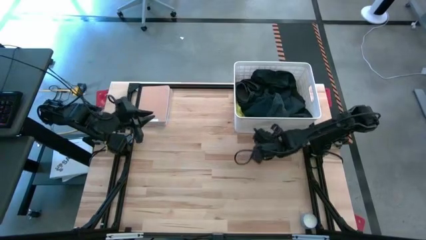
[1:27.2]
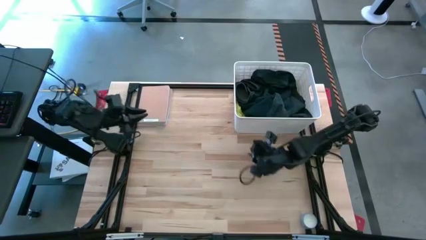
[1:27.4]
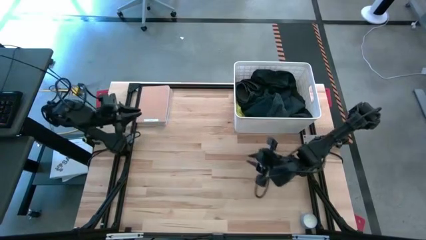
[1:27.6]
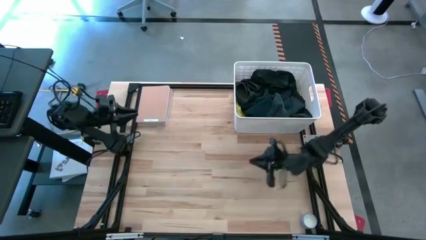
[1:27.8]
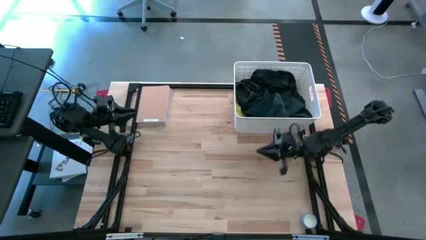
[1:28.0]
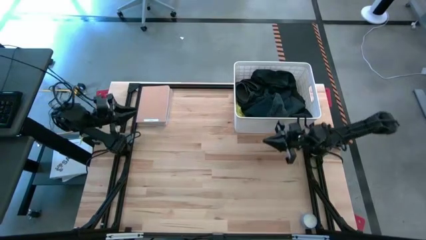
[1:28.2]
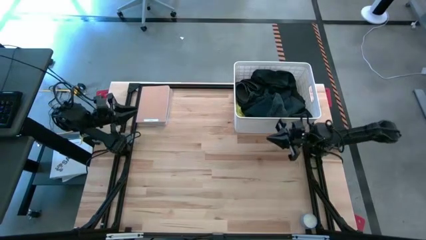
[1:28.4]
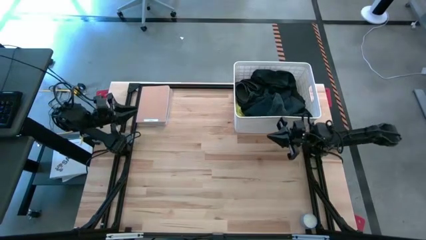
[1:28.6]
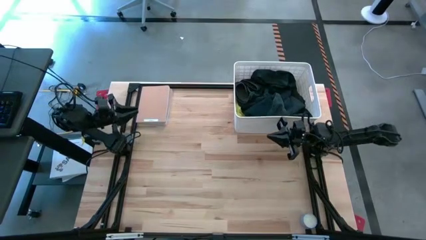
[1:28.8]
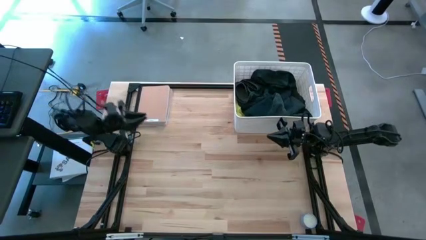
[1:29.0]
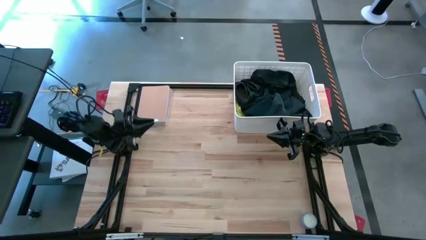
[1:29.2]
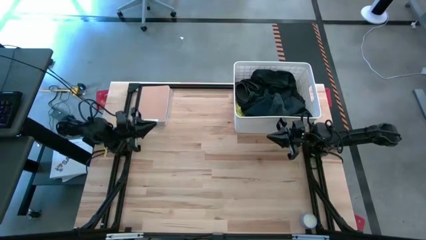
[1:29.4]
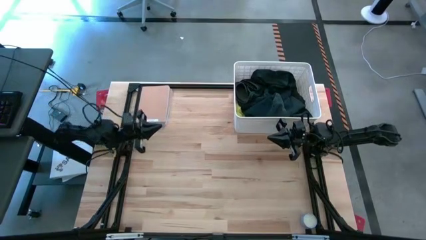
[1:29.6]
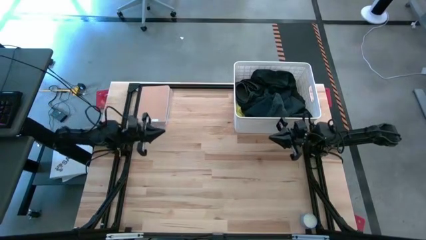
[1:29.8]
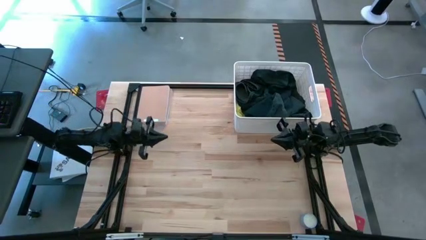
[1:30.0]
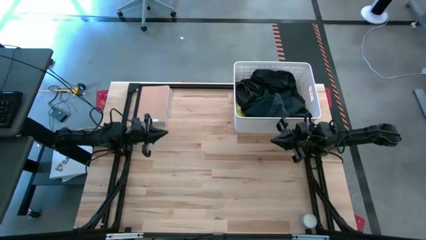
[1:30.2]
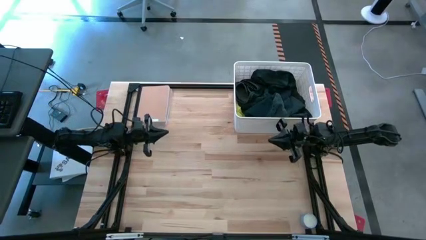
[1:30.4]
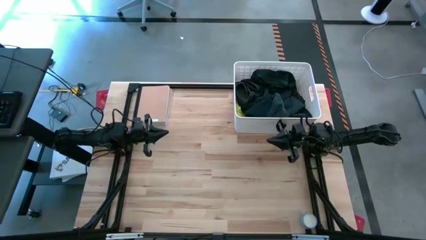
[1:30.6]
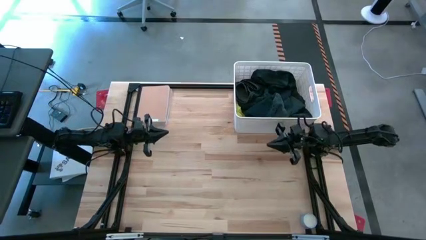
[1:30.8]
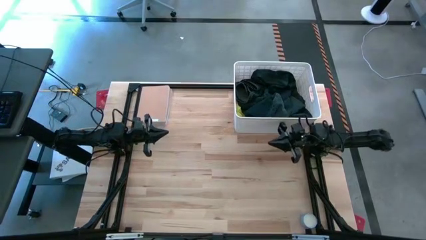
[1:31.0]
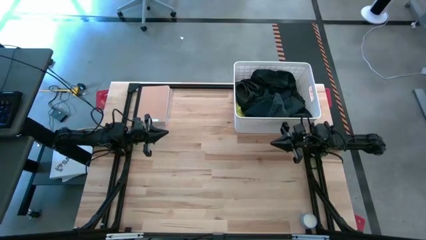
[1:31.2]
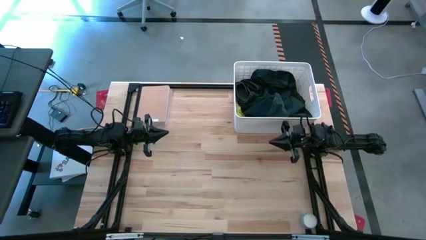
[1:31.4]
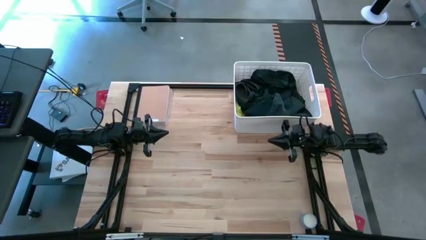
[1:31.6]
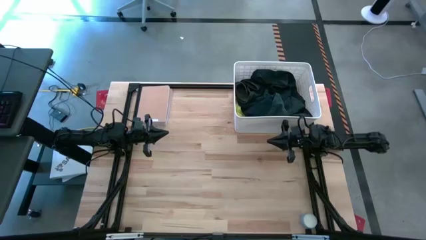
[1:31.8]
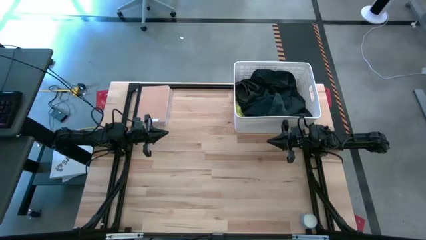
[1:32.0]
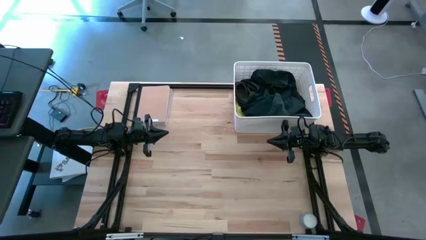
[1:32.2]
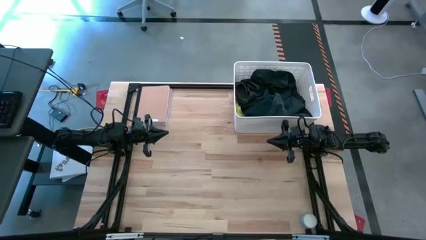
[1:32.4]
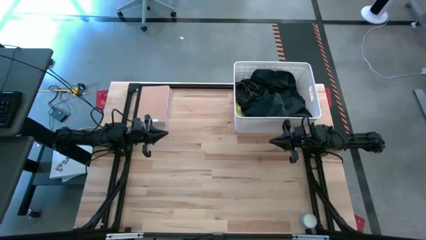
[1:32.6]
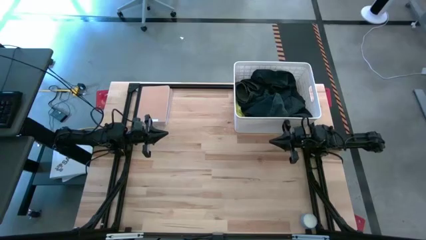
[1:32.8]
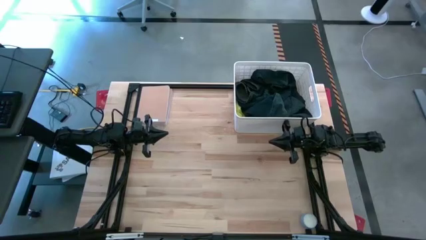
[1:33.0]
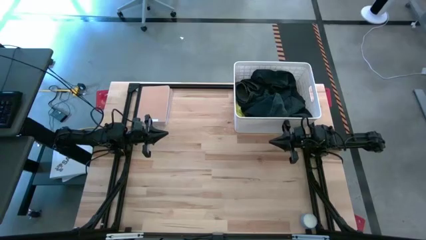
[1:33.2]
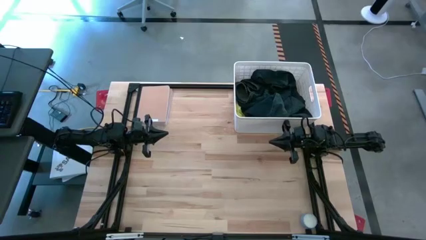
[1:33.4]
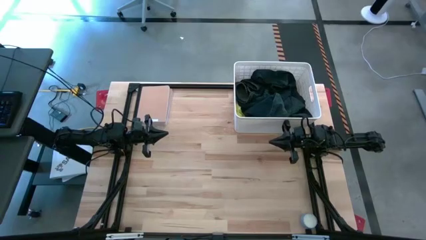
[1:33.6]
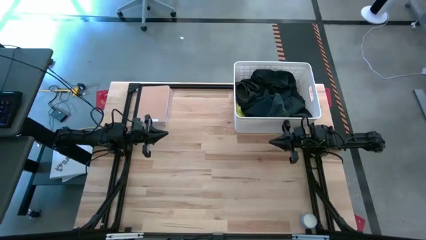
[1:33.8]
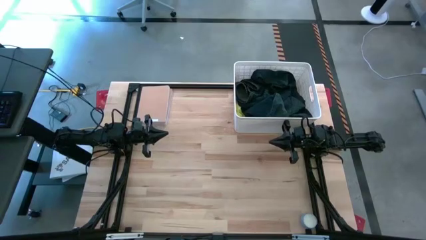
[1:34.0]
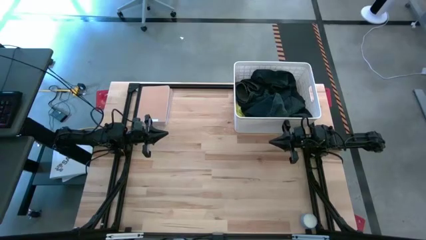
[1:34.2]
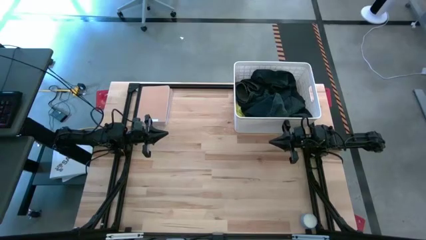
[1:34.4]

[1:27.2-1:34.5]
Task: Sort clothes
Return to Home Position

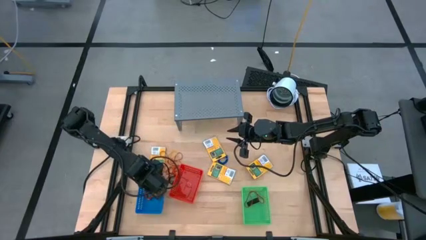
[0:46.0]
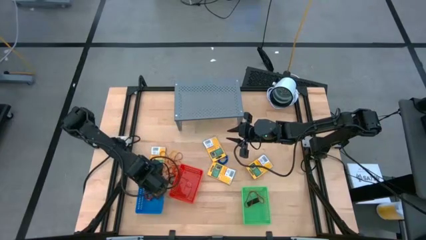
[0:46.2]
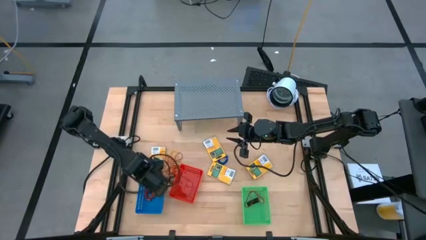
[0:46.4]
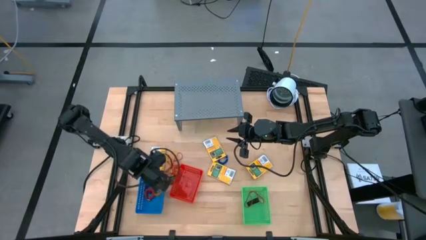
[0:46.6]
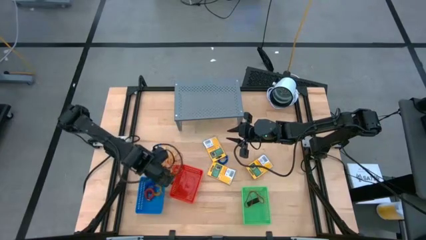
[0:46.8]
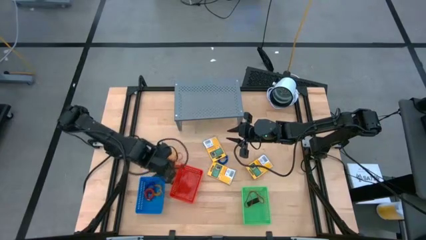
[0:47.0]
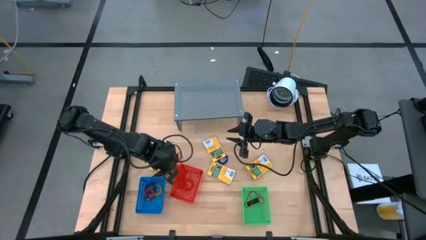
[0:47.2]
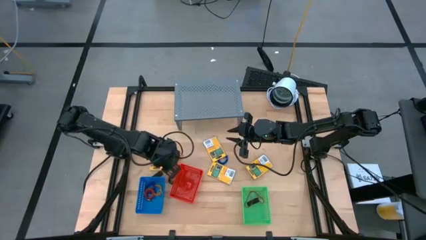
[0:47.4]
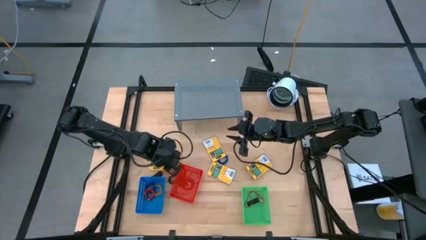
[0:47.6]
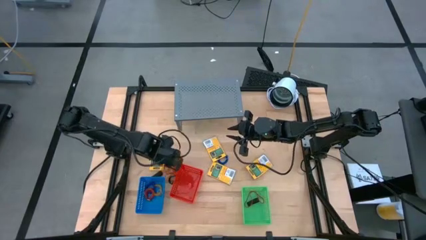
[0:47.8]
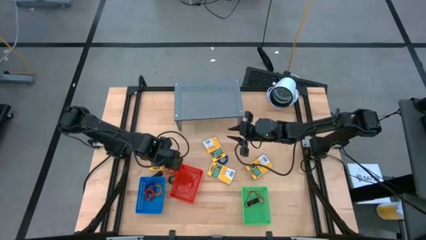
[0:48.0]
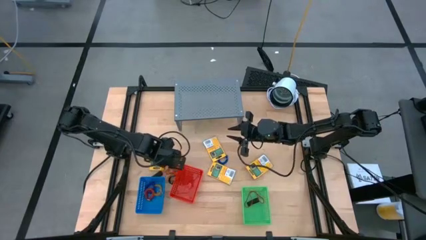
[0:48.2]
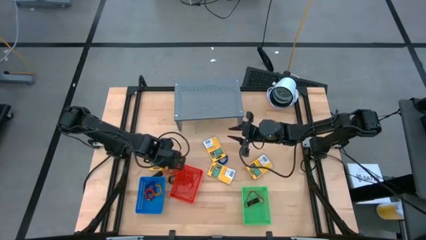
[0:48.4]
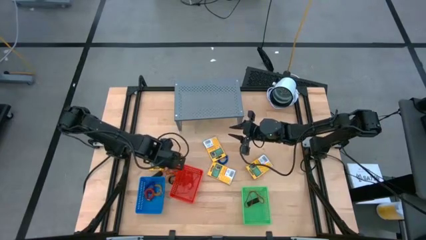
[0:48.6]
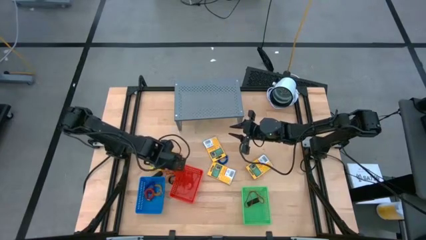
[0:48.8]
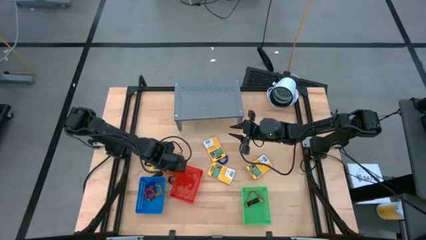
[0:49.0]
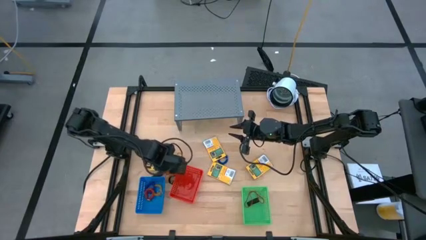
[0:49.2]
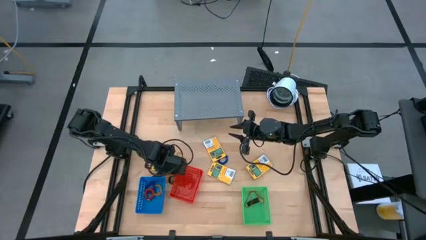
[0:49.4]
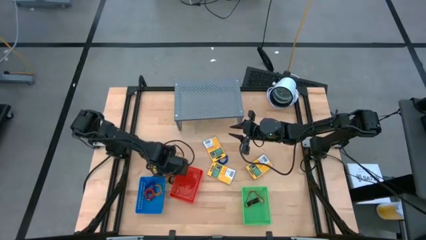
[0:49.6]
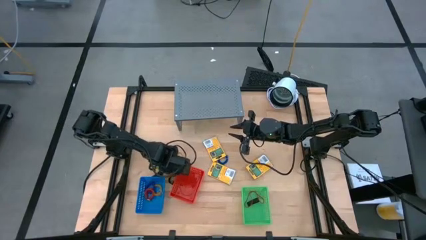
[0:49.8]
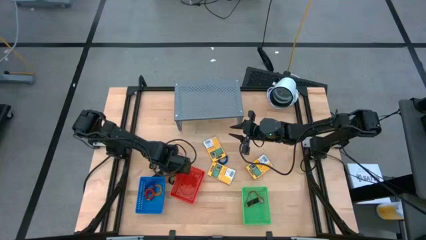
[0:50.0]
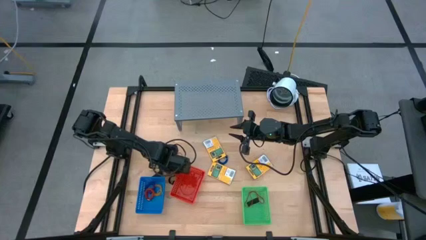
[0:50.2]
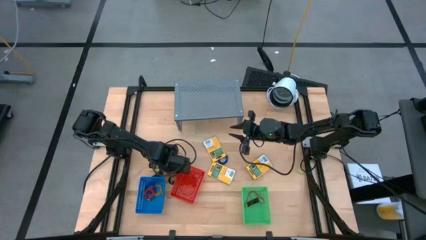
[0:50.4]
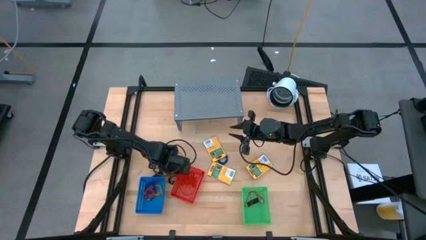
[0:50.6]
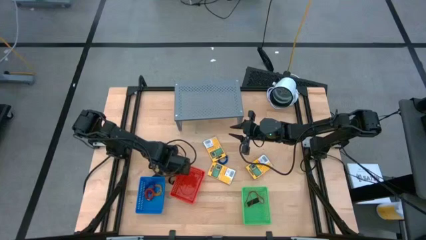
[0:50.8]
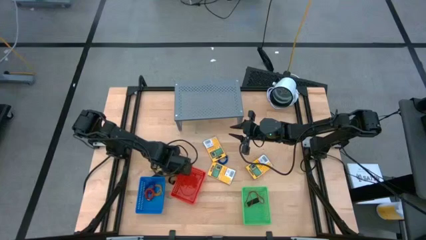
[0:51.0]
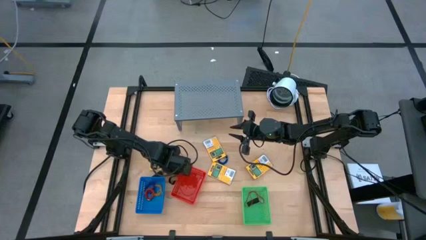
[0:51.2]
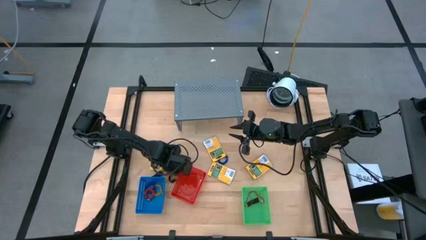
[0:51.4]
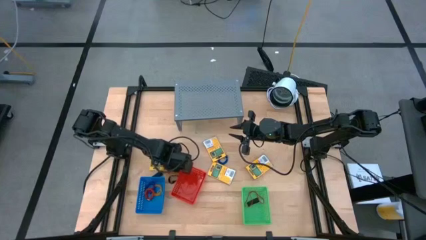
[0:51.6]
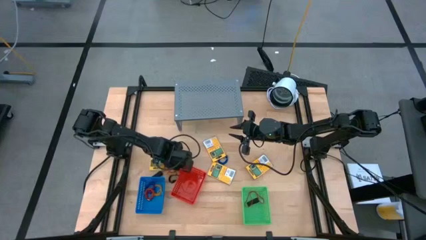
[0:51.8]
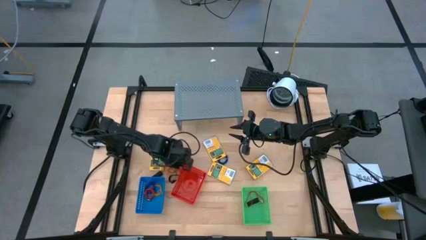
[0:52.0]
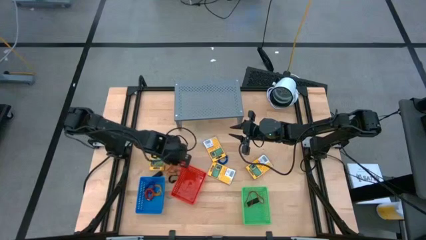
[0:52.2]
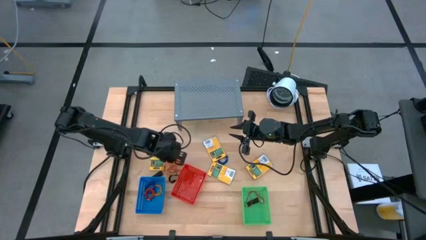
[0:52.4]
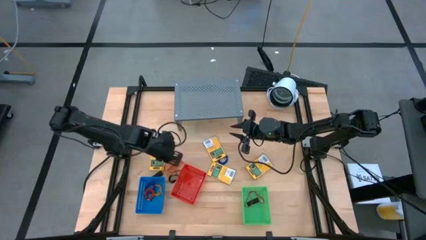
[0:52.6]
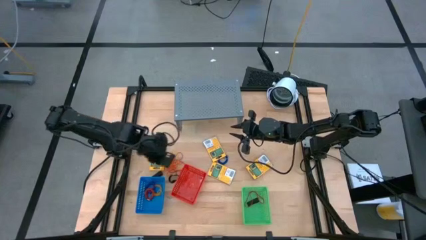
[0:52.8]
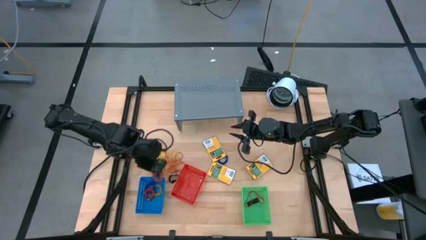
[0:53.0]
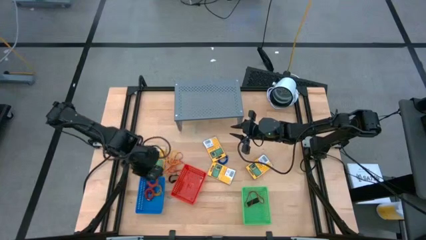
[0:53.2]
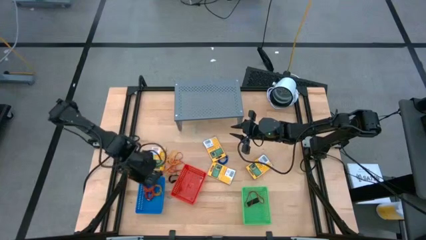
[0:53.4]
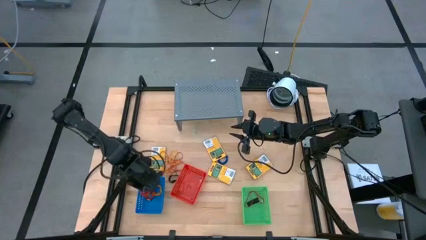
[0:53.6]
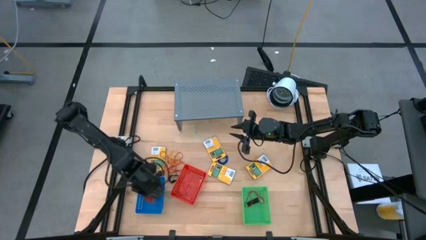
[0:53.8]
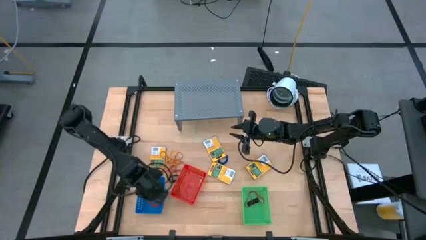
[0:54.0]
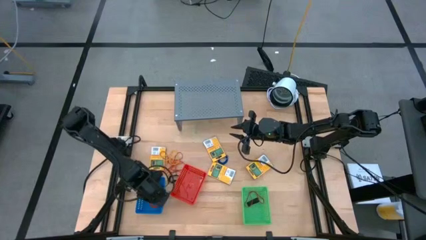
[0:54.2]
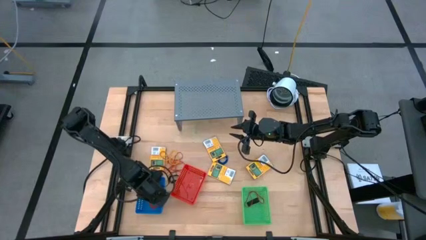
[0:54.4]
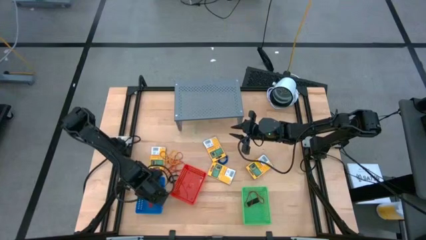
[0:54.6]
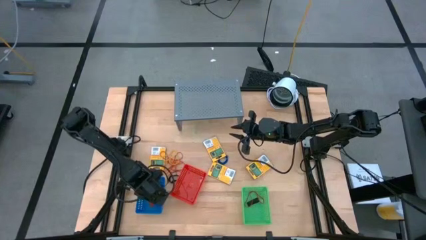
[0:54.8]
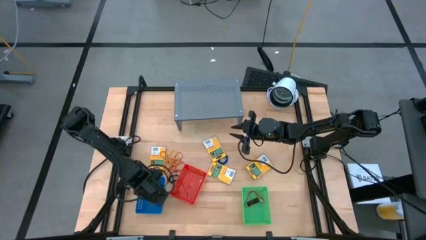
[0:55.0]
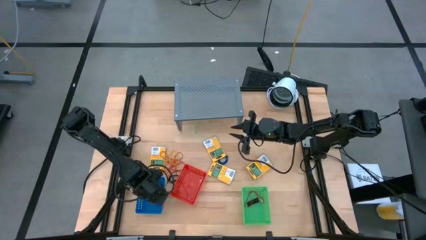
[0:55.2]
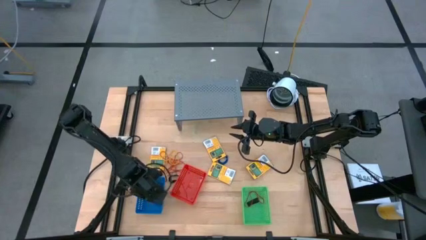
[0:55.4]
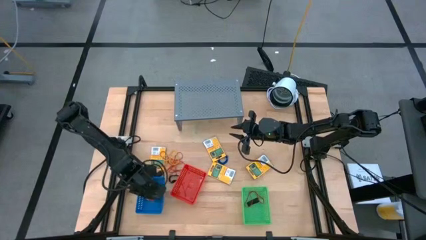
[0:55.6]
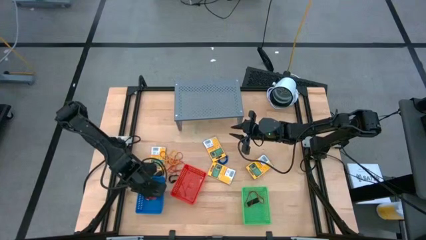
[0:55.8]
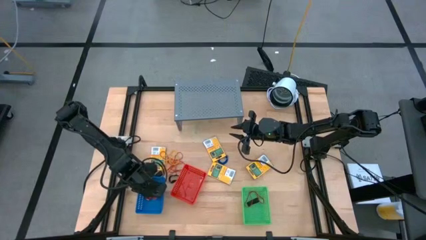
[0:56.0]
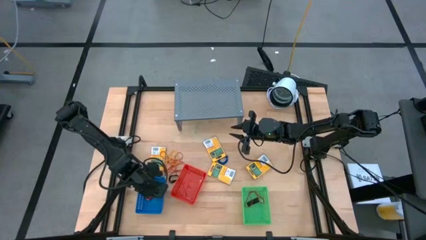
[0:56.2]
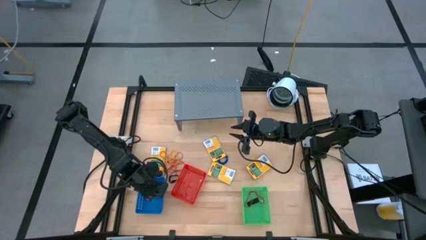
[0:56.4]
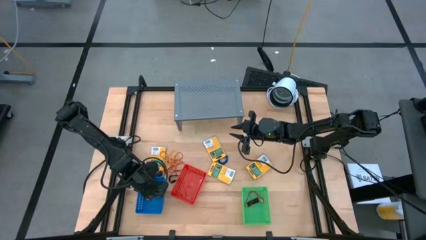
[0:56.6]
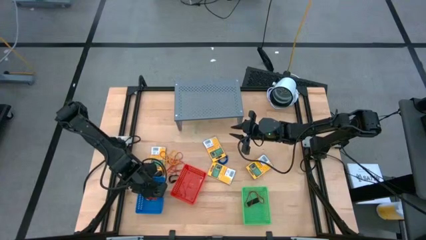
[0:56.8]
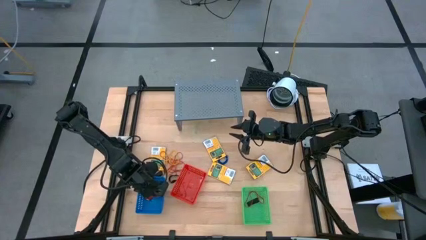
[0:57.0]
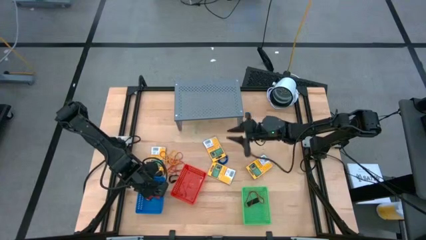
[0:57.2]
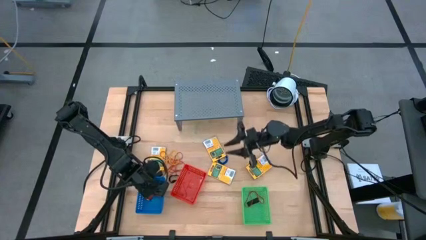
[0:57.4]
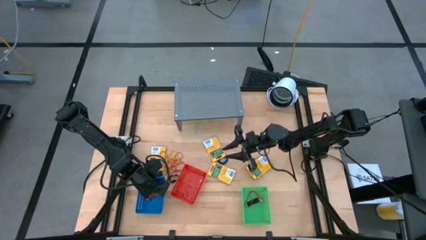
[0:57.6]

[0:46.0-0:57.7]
Task: Pick & Place Office Desk Supplies
Put the orange spring keychain into the blue basket
